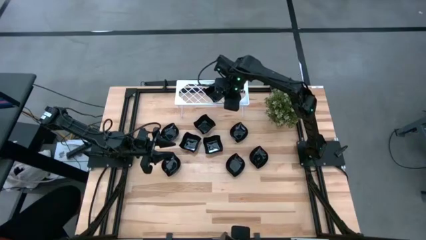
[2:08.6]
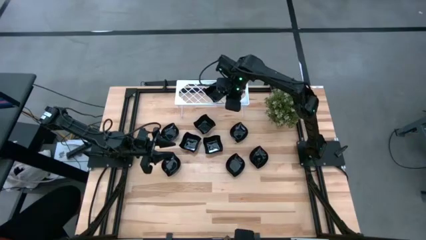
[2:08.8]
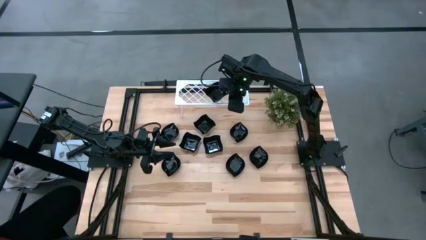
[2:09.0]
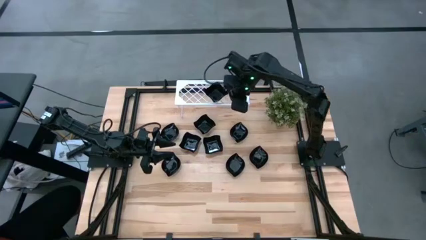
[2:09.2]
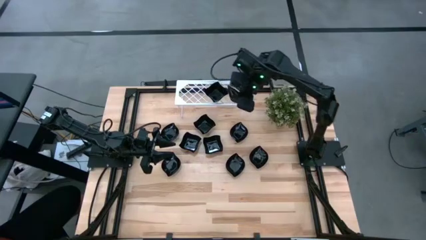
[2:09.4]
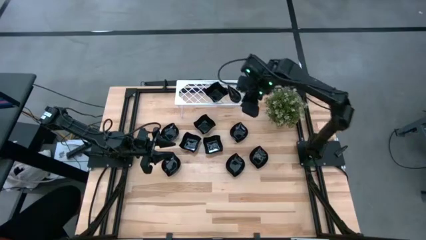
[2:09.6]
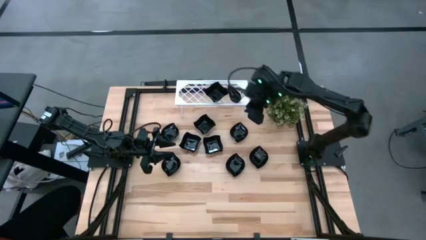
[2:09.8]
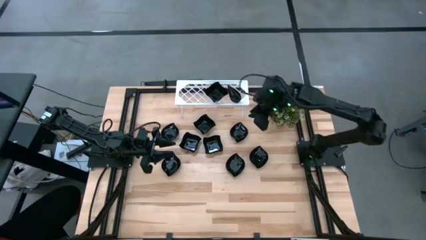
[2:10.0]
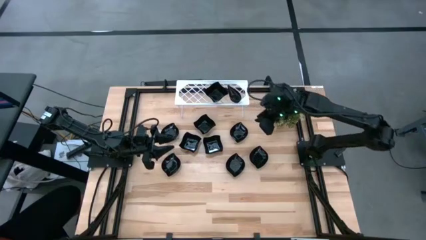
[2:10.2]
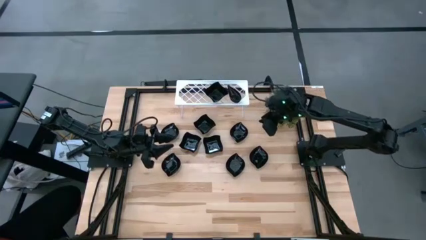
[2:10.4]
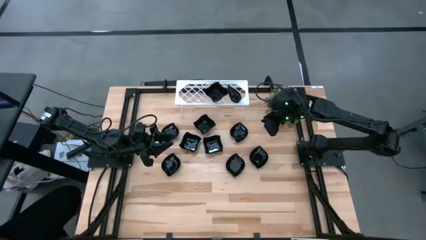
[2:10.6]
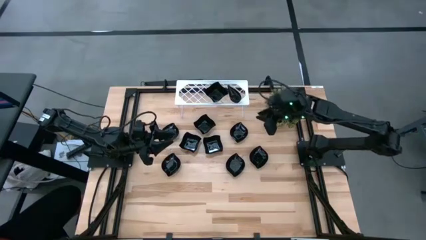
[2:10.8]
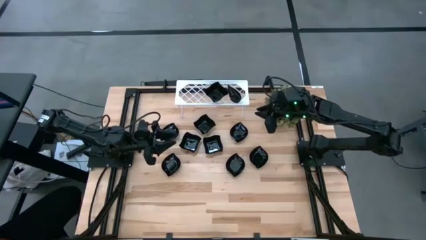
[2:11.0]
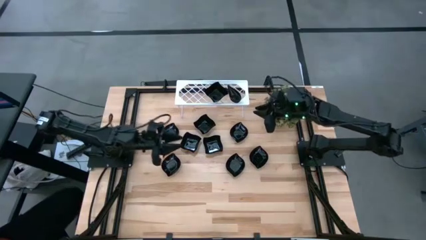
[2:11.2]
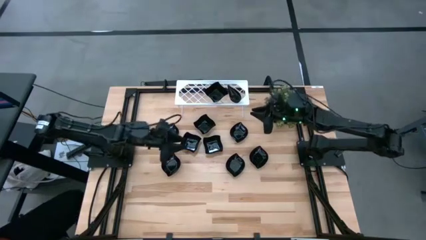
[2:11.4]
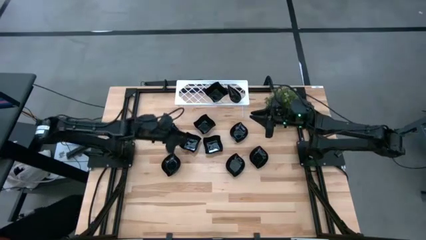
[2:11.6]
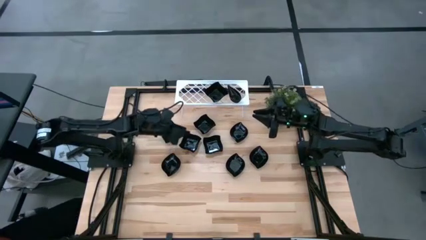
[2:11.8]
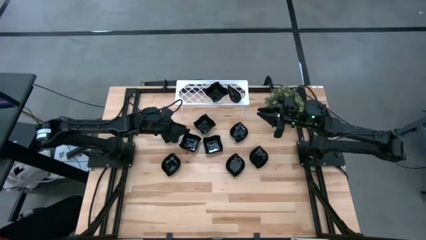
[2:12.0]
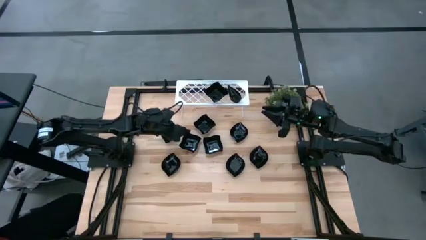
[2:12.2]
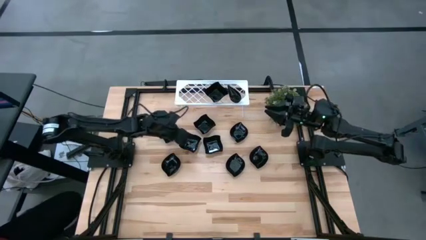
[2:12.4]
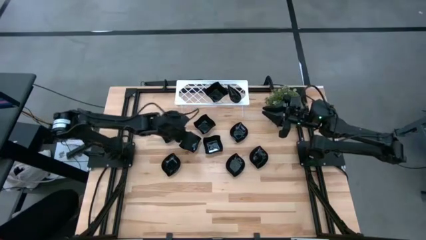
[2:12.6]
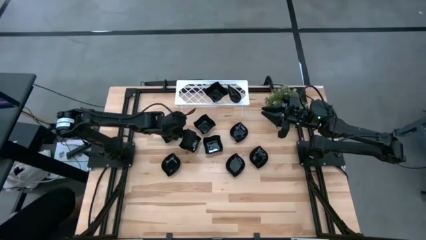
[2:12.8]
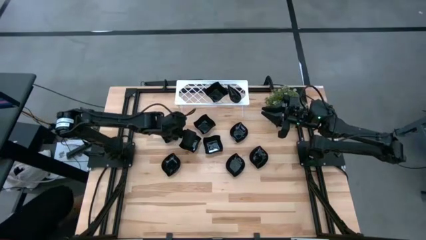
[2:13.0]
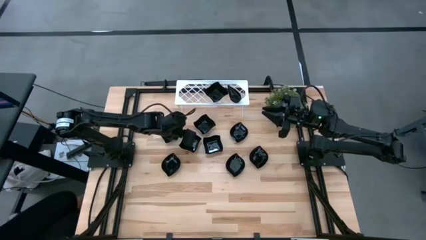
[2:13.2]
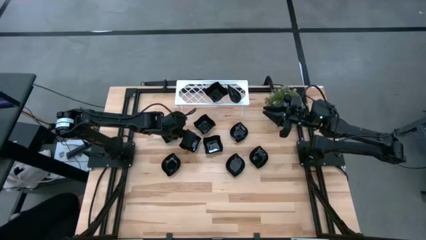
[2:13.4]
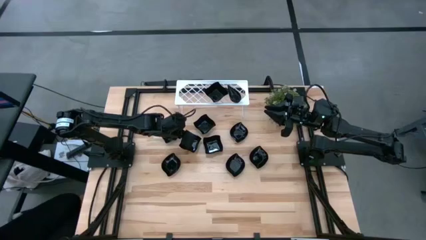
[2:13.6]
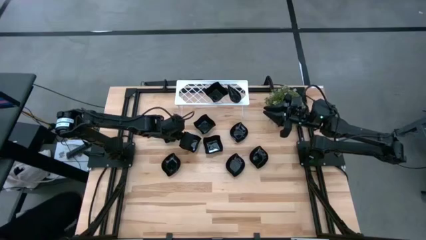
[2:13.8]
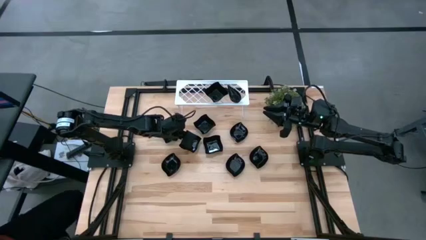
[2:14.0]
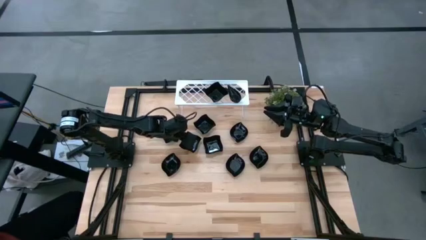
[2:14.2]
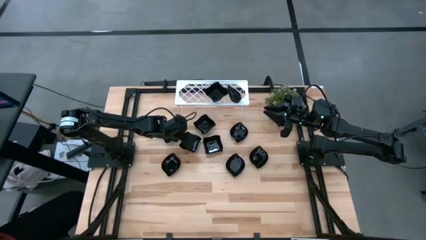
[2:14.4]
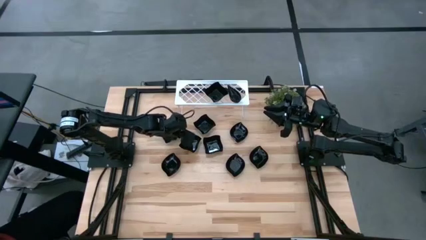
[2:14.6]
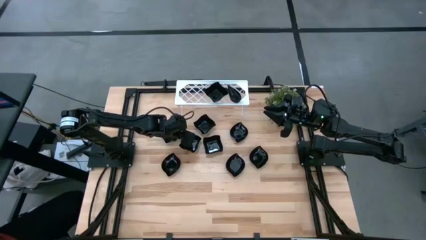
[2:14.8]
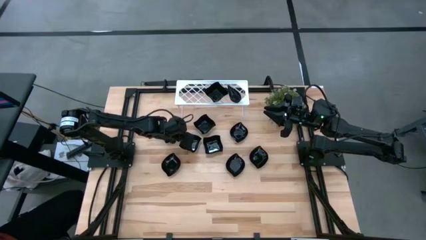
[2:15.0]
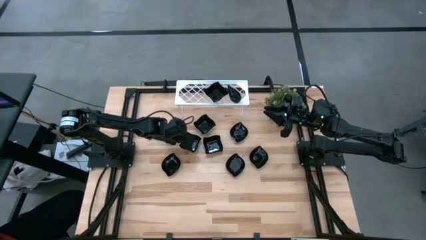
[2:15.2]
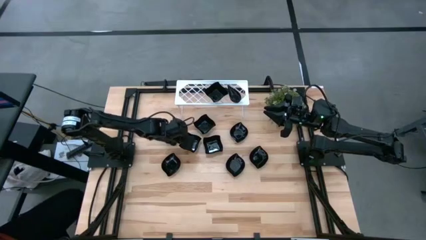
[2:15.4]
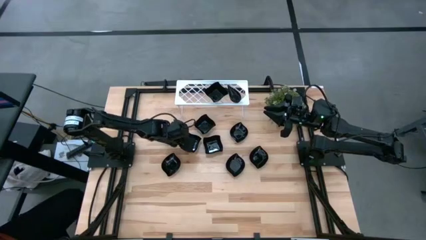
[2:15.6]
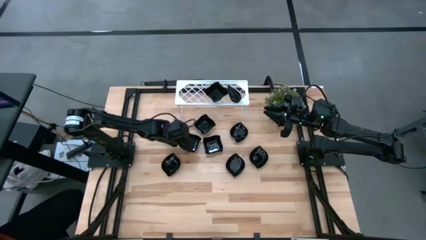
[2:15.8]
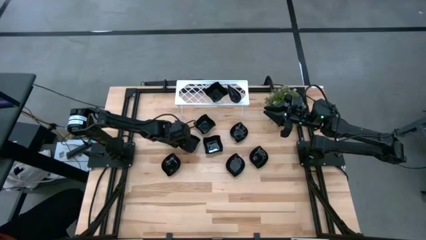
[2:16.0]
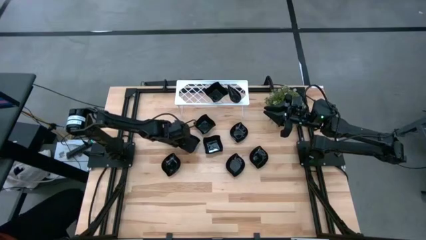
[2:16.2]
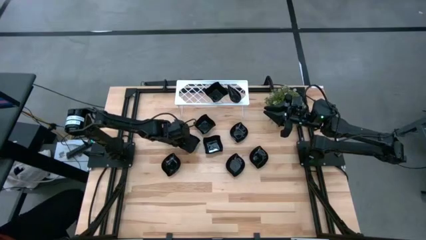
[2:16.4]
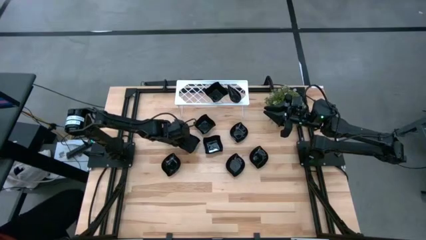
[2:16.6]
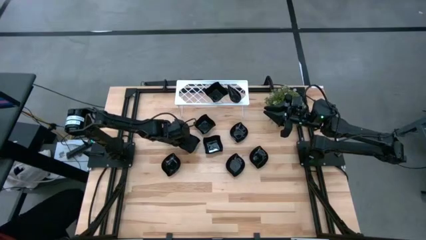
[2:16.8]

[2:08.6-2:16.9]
Task: Pick & Place Mini shaped plates
Stack the distorted square plate on top of the other distorted square plates on the shelf

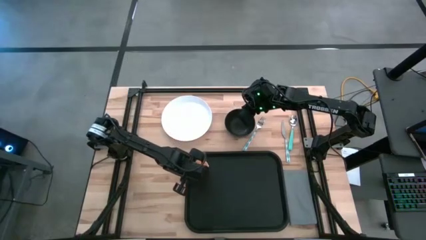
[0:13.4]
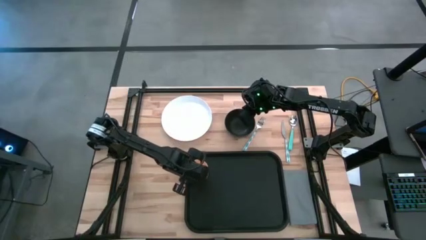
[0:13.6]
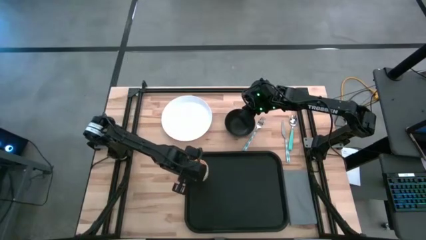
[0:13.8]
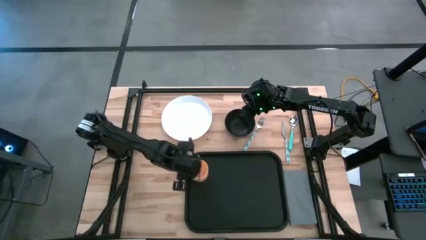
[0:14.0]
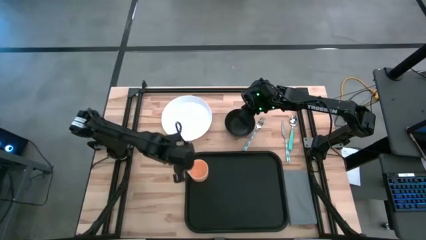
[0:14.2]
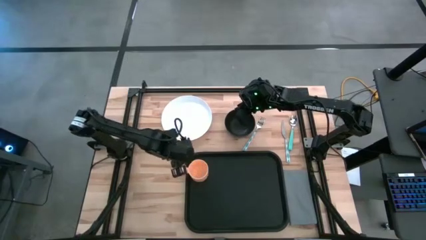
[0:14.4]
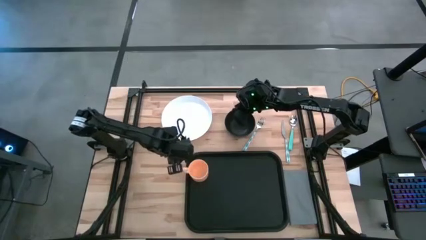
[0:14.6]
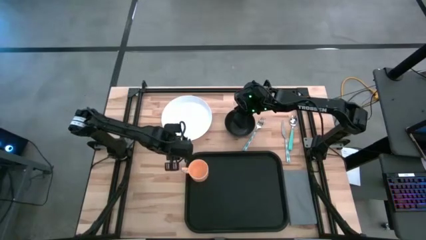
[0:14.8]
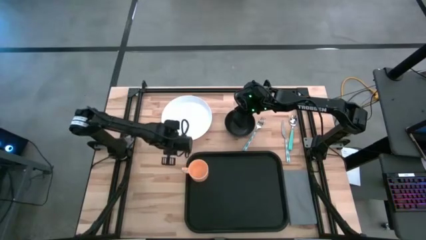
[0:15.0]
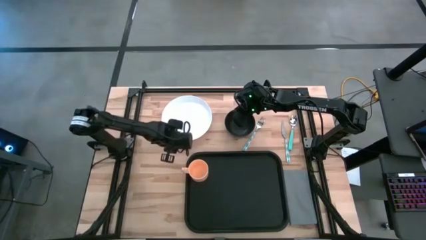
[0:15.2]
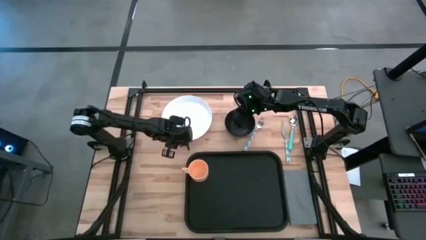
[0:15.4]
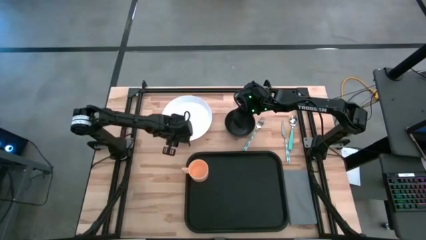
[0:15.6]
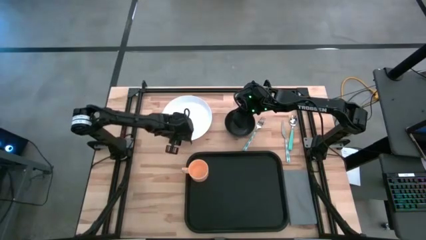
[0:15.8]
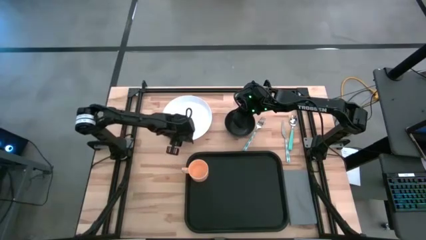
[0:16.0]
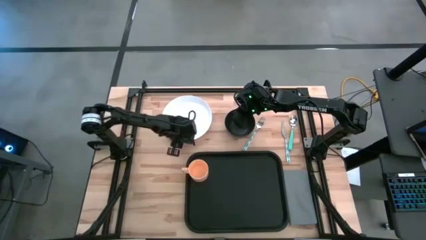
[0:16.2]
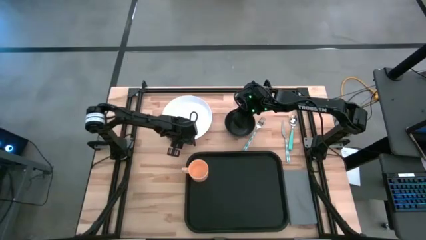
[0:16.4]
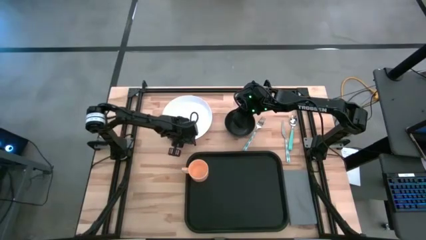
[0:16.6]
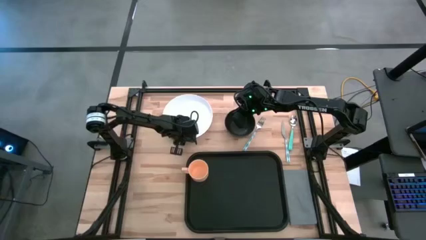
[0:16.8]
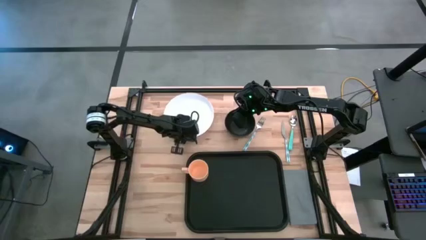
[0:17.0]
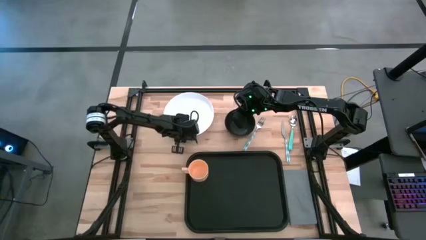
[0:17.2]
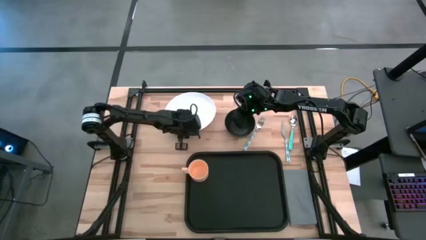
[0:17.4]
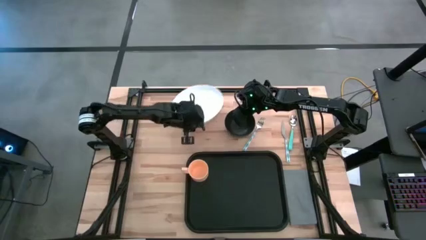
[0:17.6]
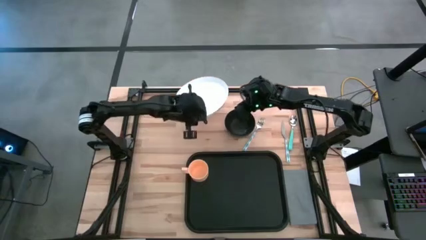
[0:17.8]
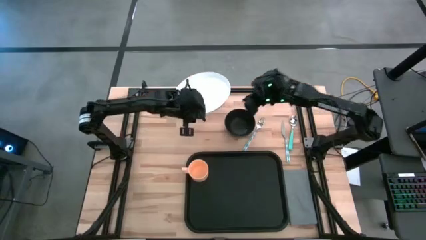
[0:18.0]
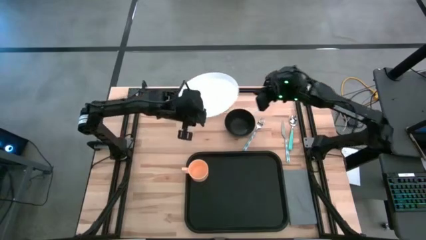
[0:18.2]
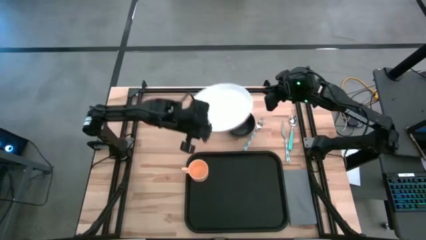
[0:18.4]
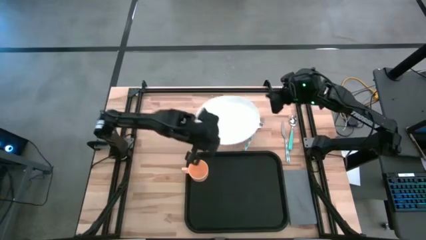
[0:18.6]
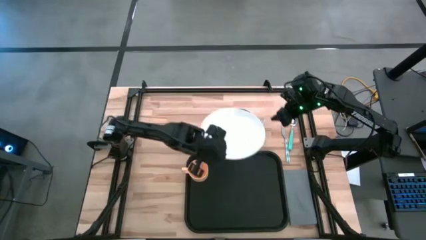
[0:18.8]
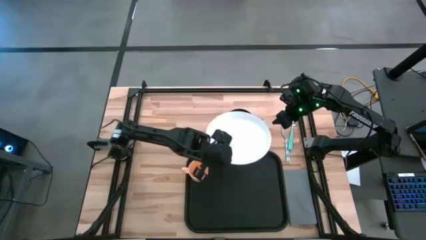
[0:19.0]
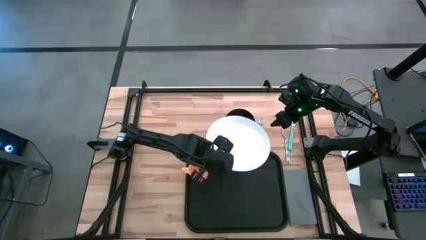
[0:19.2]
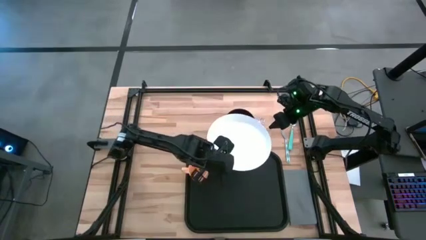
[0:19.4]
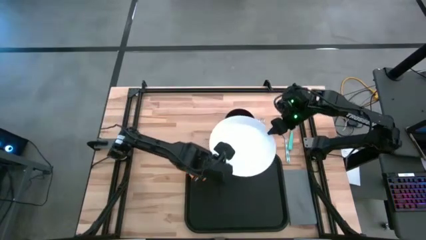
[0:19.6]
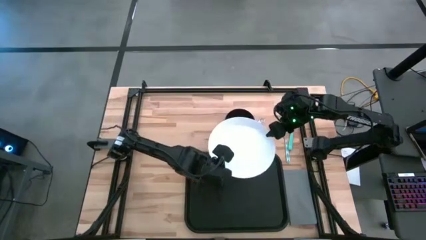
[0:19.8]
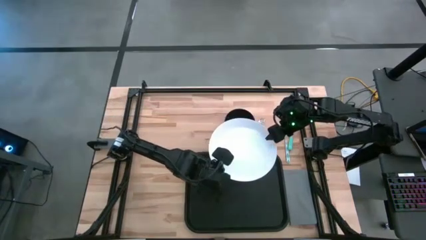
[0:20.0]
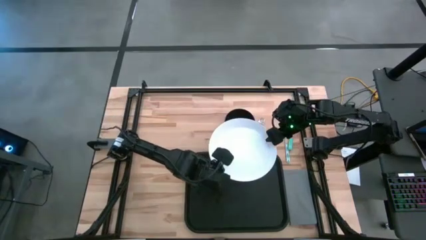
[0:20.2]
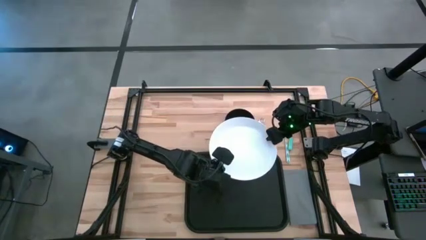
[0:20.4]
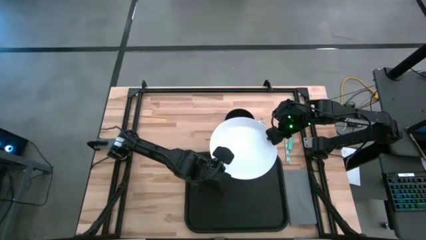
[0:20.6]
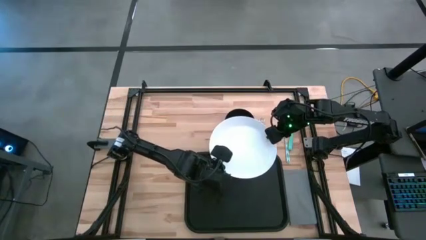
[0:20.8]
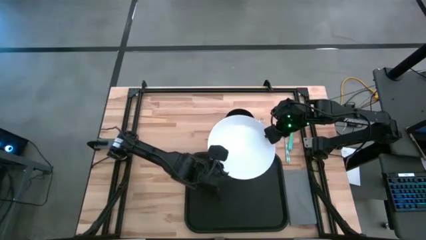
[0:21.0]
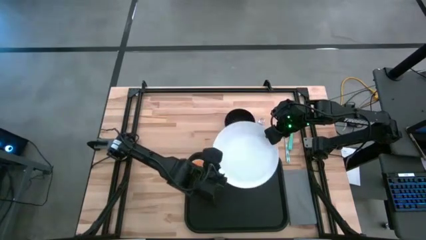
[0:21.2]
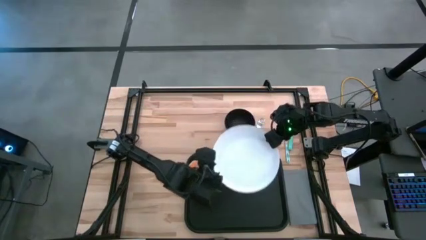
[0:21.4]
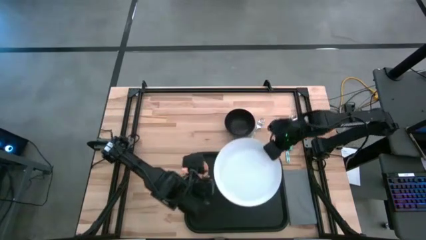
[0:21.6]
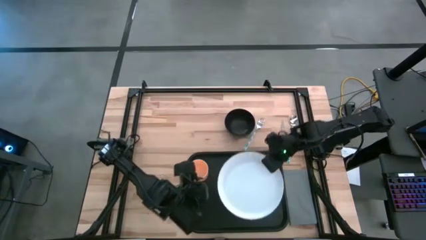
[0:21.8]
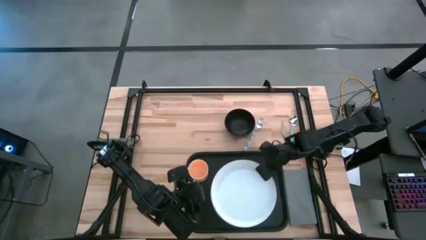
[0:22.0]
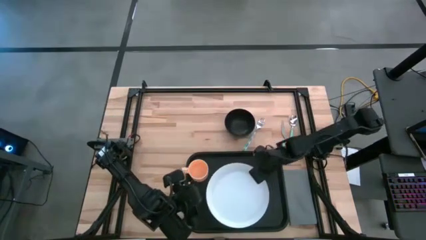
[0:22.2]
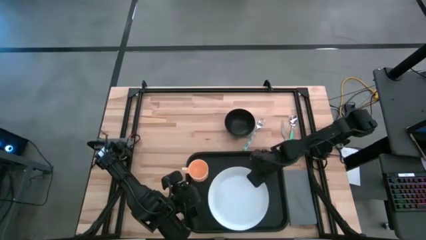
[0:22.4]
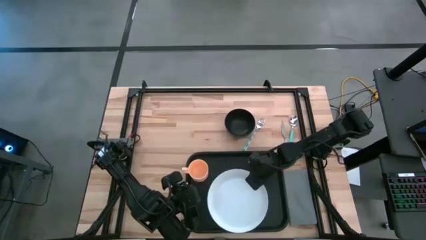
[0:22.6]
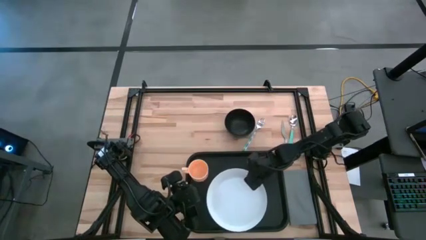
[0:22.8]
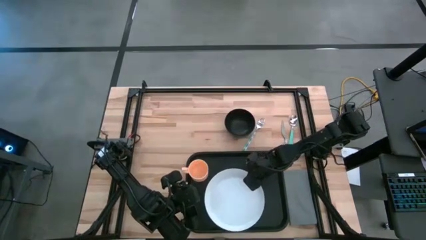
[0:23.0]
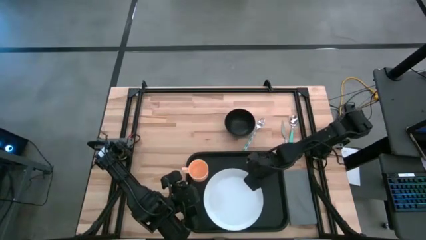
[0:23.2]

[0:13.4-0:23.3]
Task: Set up tray
Put the white plate on the bottom right of the yellow cup on the black serving tray
